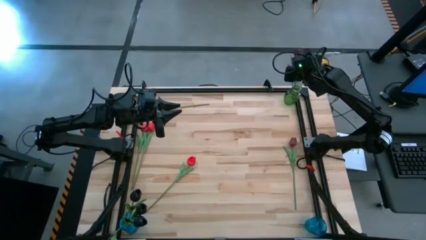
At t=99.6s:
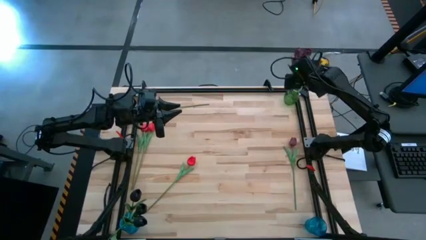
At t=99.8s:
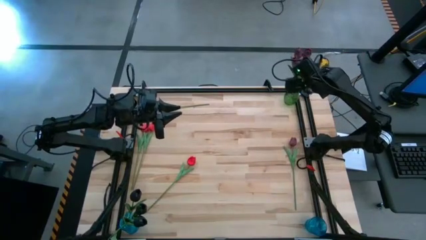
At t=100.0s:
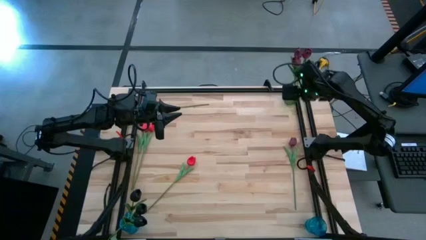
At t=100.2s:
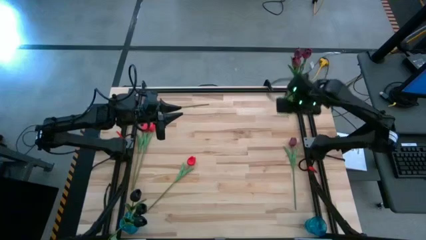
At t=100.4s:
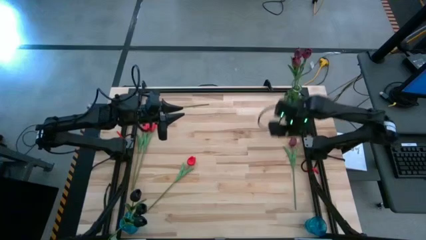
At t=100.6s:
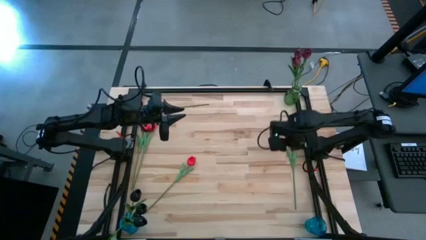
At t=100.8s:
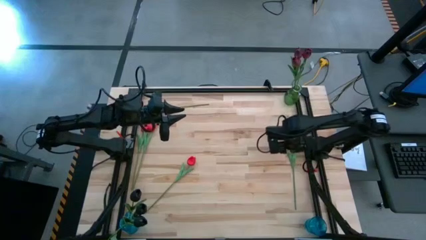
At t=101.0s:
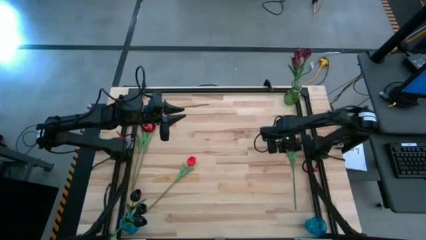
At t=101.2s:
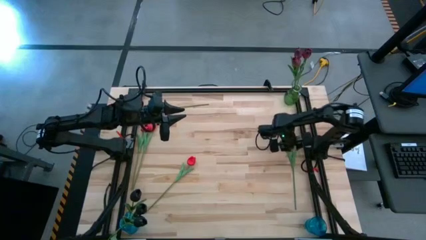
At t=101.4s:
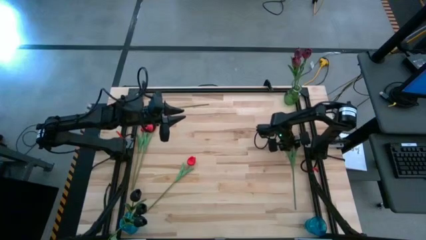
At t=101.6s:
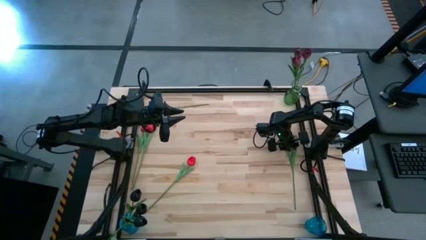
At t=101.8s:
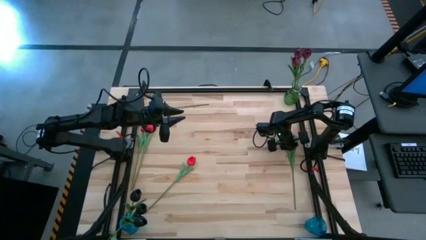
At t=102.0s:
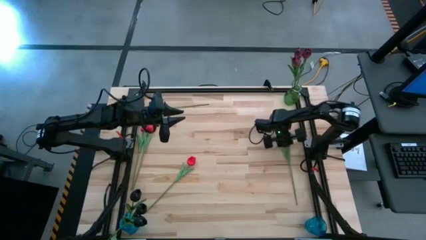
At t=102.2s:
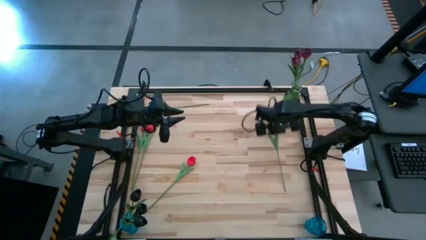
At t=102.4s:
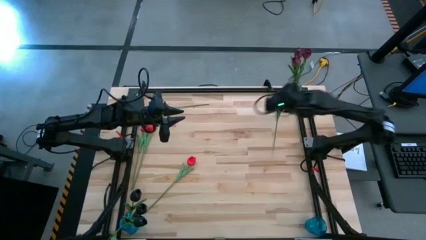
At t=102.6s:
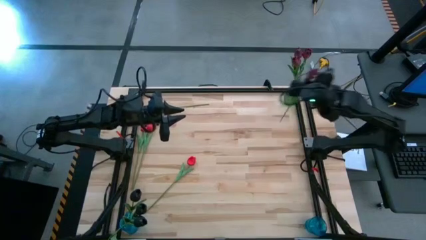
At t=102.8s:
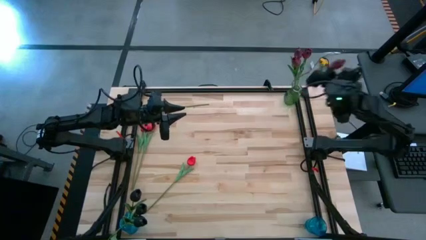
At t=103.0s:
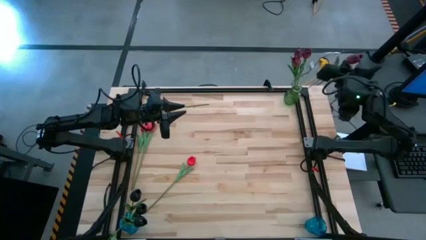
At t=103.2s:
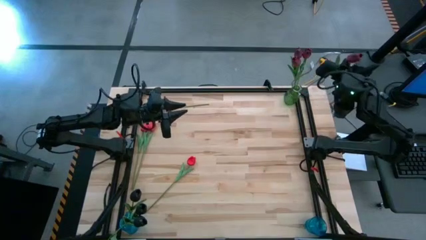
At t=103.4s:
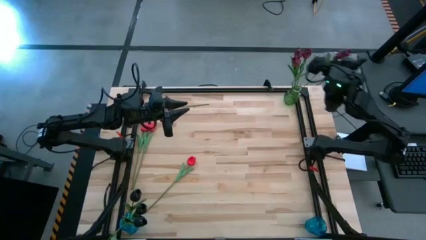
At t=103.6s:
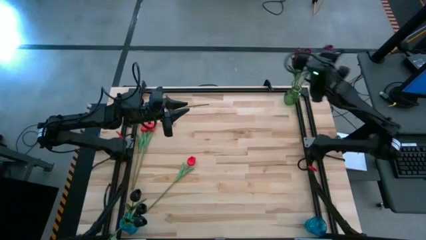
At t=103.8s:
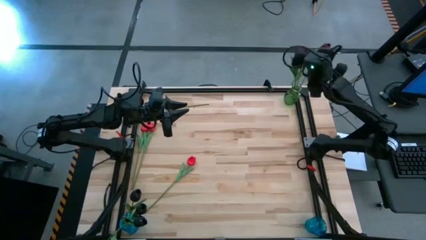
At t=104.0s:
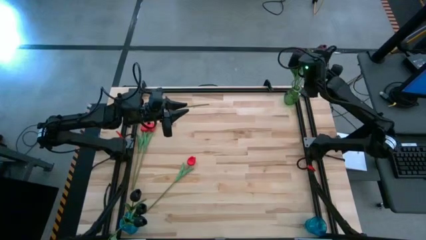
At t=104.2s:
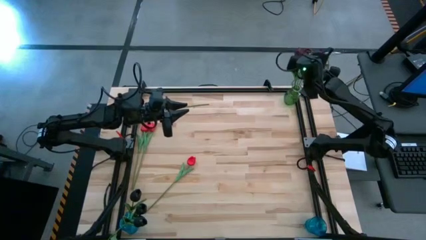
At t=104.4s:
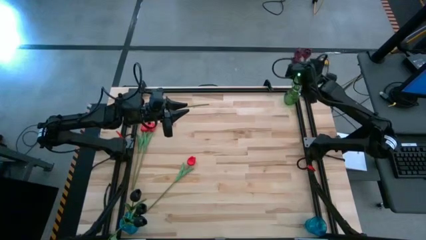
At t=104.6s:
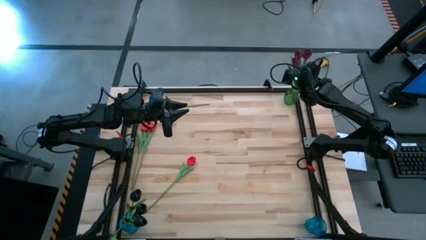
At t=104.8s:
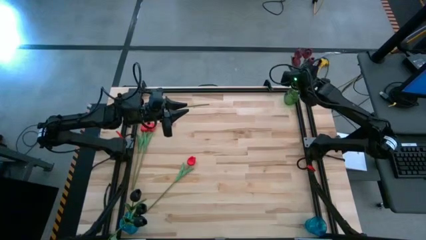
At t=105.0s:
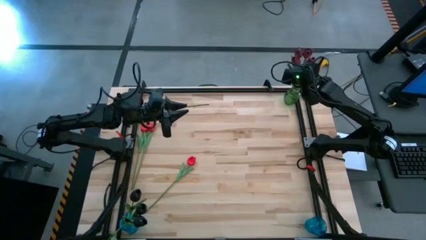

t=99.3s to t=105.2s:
Task: Sort flowers into vase by color
Put the dark red tulip into the green vase

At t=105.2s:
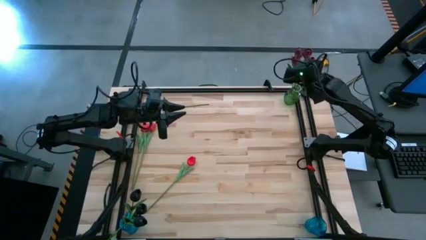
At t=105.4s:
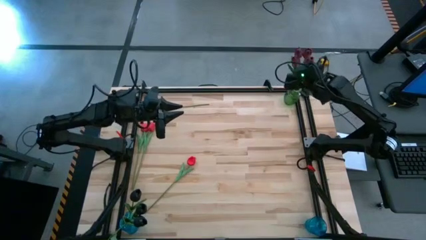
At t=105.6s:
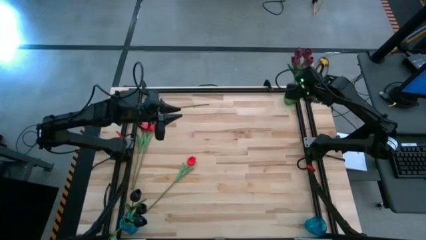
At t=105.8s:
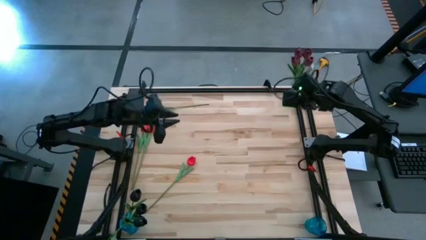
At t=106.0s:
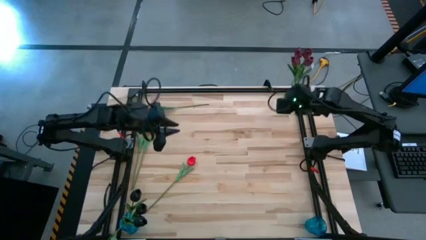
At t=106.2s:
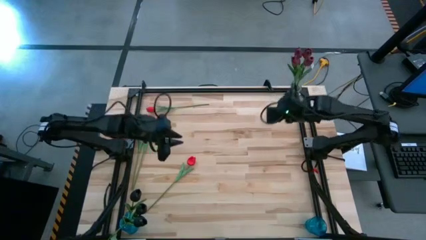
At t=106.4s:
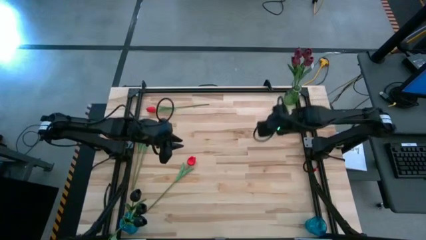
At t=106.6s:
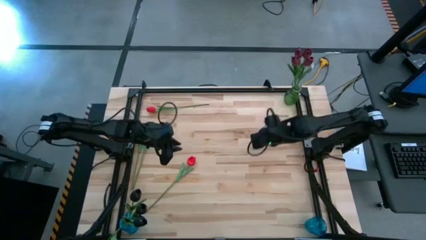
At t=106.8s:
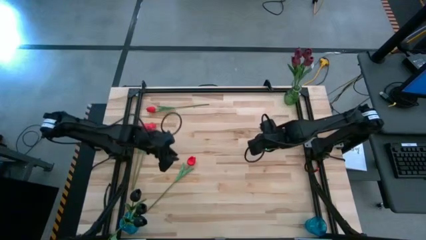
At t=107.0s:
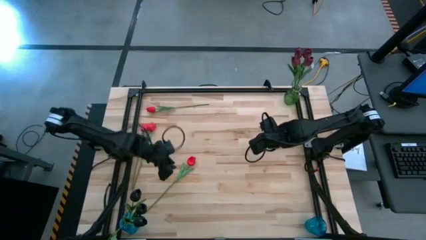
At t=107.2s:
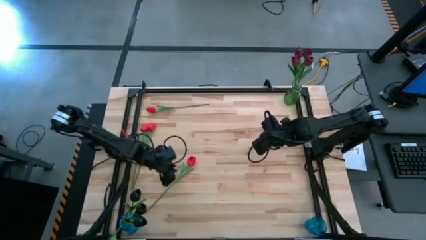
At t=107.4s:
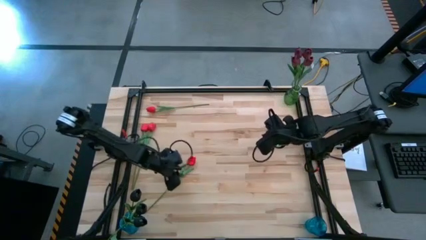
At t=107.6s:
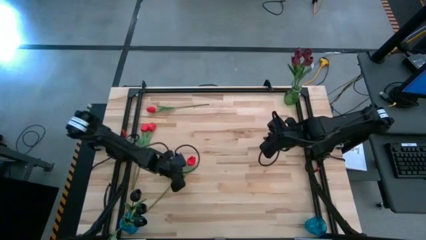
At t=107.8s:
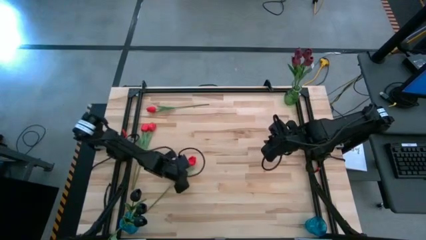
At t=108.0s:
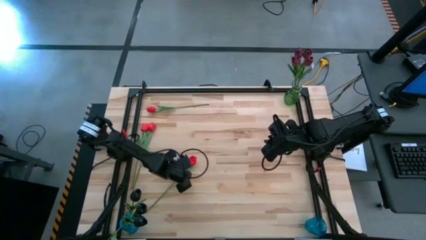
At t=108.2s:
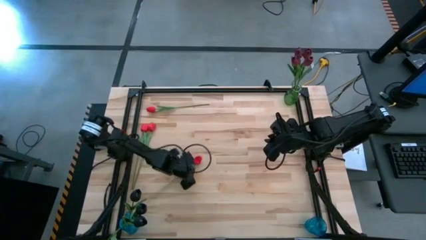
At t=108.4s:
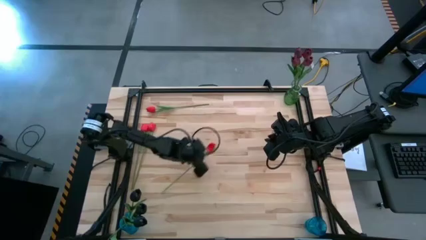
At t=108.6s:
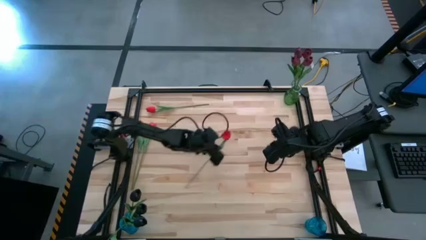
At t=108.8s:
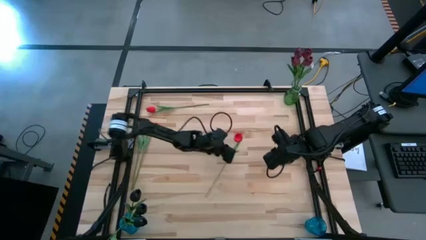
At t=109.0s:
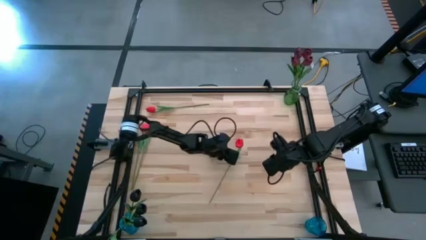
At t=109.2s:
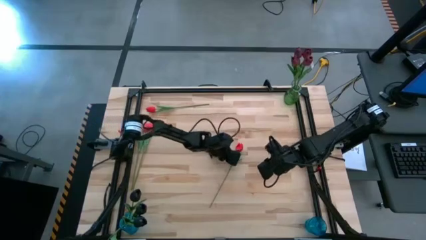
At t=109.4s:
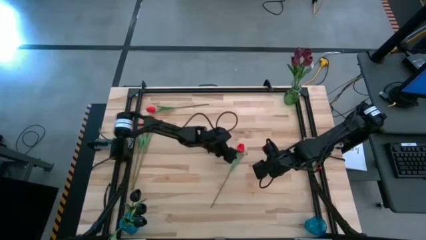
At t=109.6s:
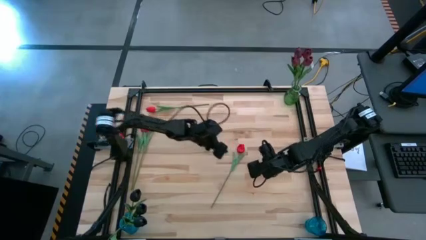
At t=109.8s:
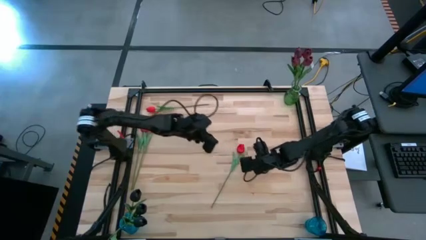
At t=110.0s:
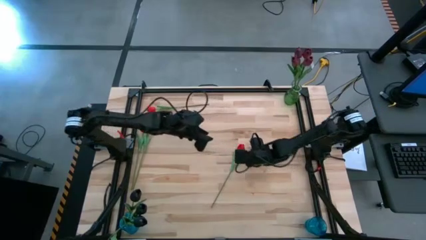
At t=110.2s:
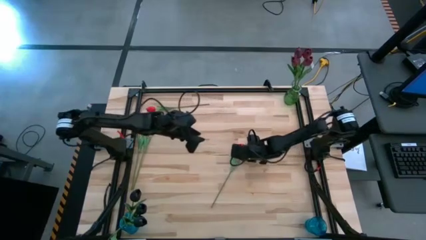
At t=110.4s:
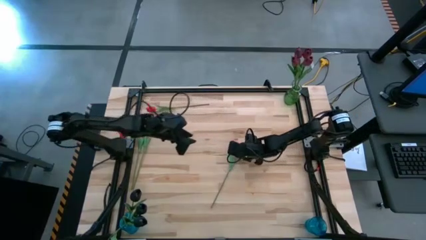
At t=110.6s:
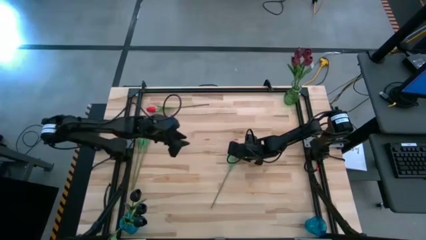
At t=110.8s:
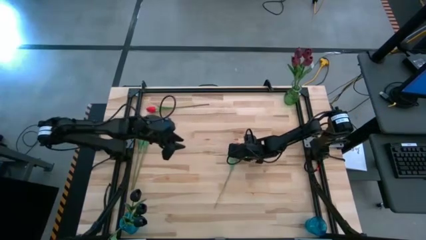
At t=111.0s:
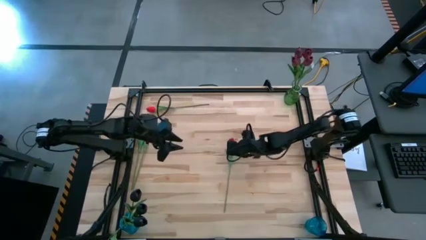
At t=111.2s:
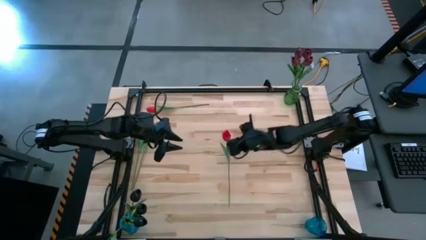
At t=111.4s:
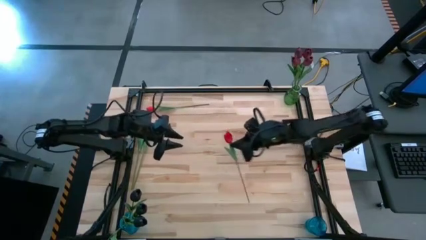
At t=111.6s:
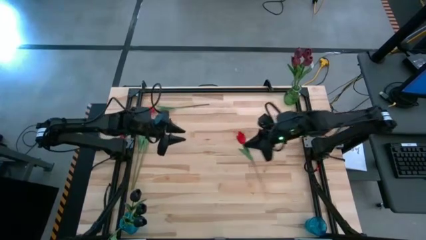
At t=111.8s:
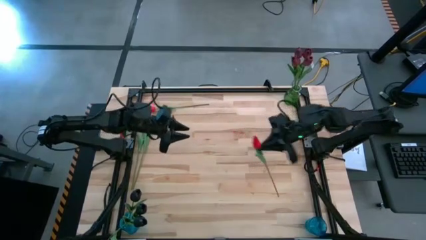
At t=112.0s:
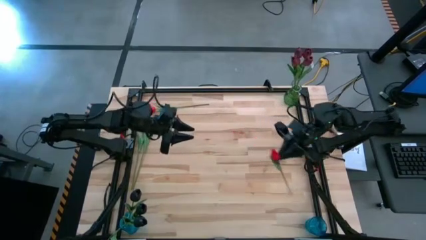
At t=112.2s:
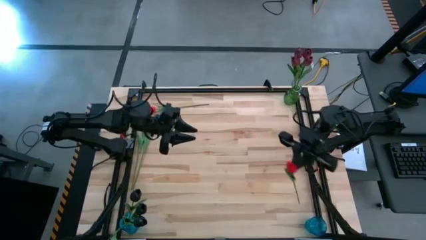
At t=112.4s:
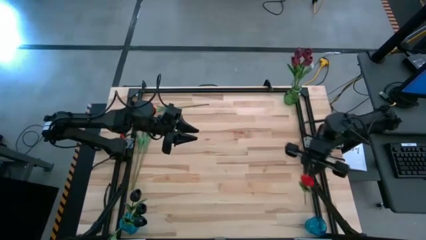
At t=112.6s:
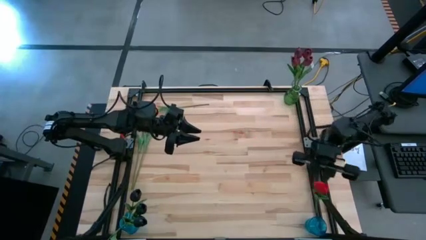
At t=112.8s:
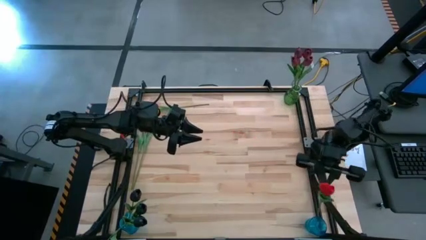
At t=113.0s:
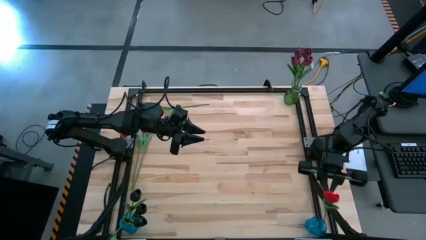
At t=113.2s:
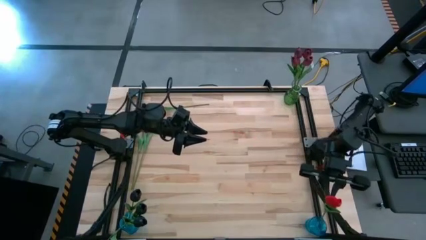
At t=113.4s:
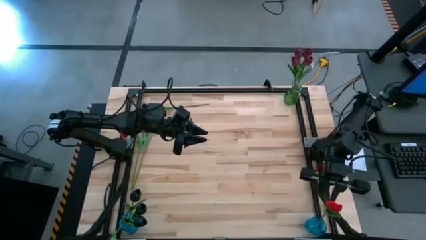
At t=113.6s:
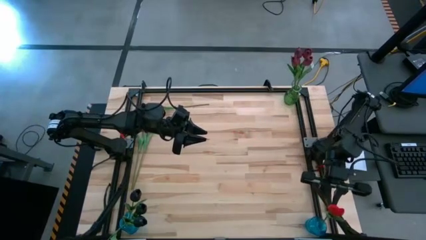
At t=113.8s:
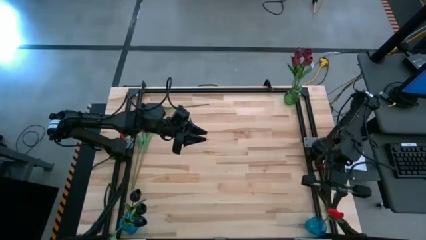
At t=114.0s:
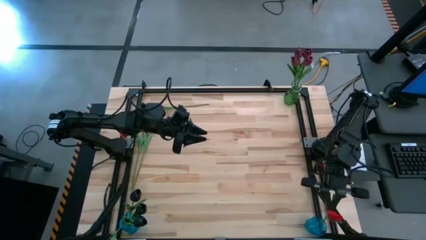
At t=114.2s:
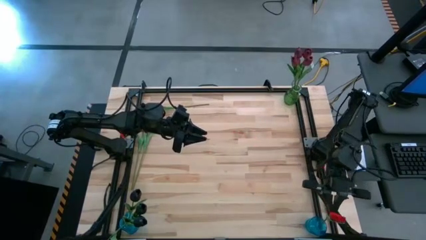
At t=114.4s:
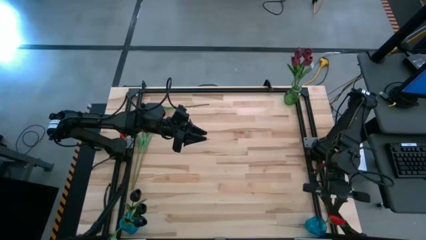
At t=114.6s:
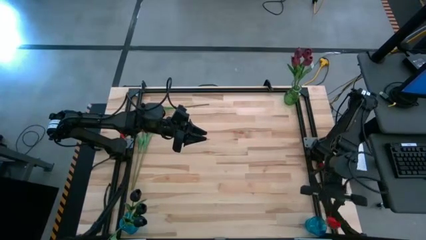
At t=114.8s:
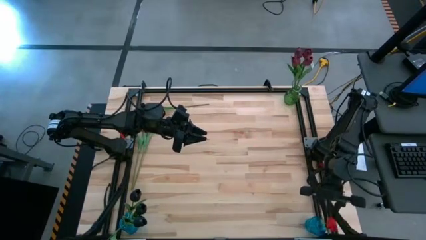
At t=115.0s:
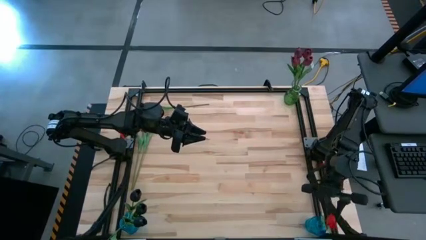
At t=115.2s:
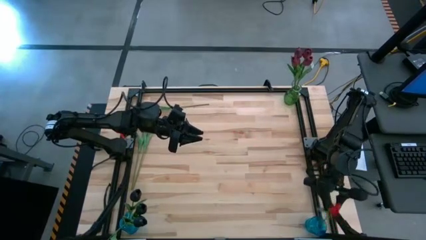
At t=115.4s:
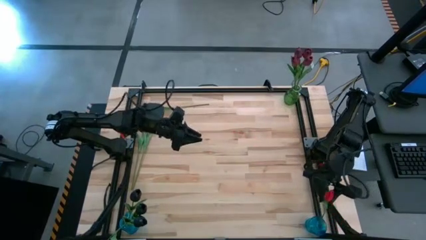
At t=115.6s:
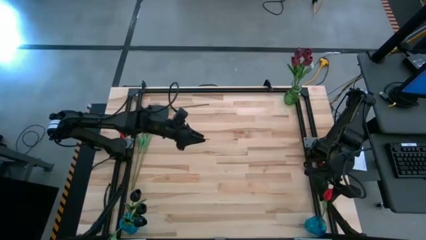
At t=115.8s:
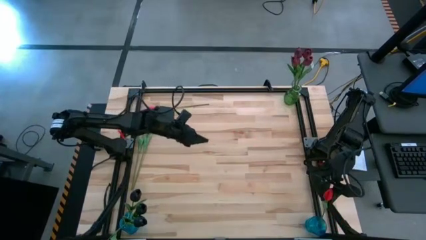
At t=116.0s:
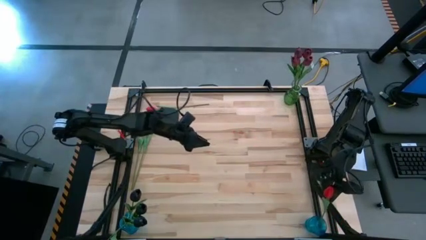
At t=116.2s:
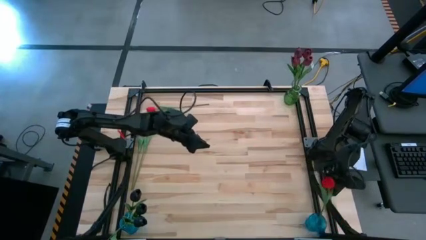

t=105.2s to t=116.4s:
Put the red tulip into the right blue vase
